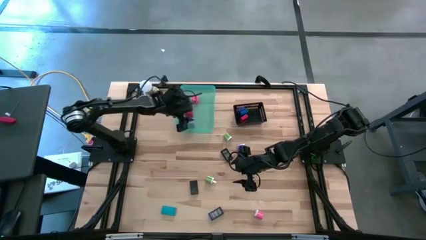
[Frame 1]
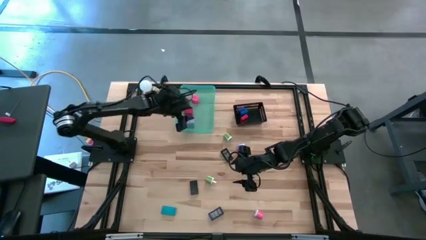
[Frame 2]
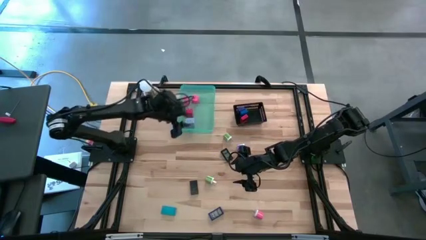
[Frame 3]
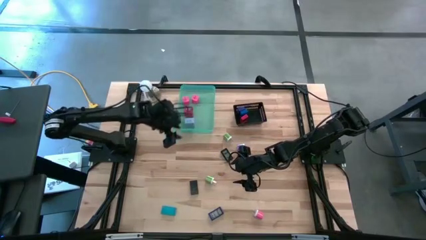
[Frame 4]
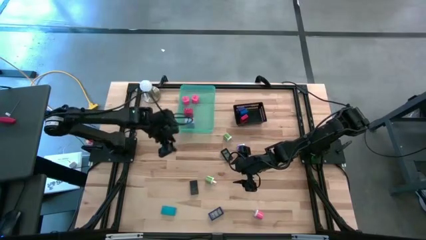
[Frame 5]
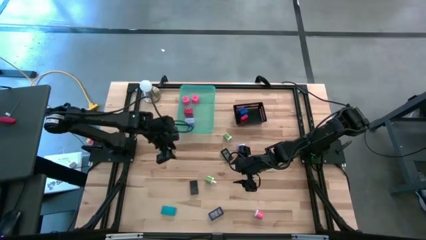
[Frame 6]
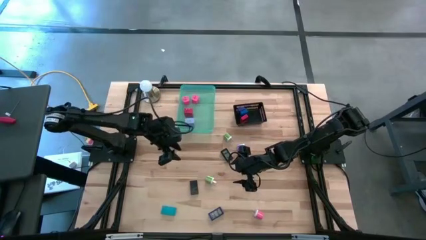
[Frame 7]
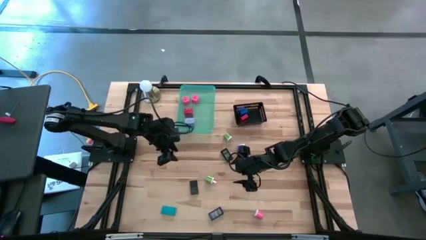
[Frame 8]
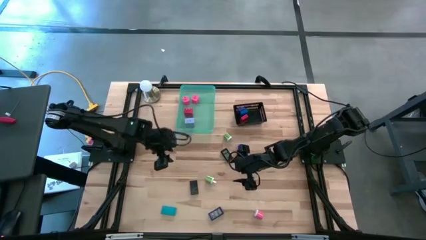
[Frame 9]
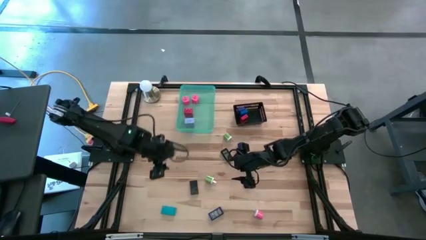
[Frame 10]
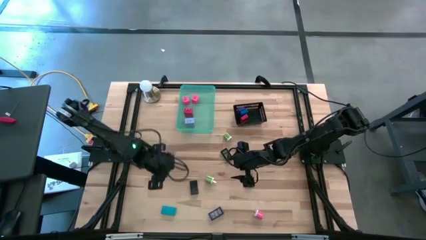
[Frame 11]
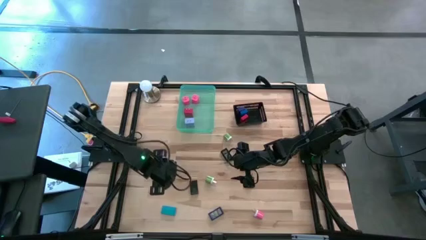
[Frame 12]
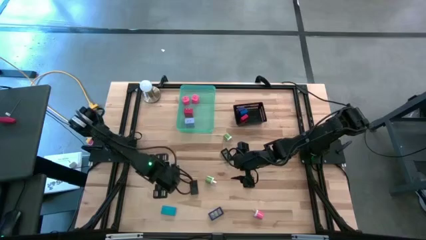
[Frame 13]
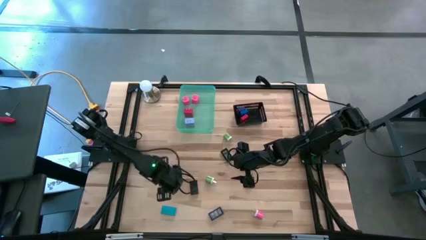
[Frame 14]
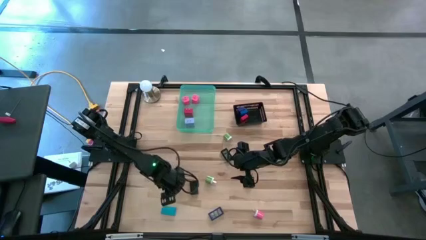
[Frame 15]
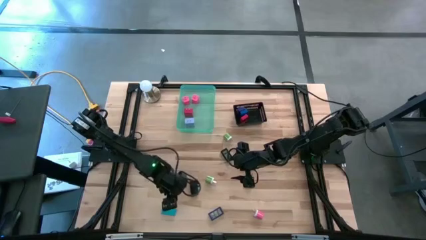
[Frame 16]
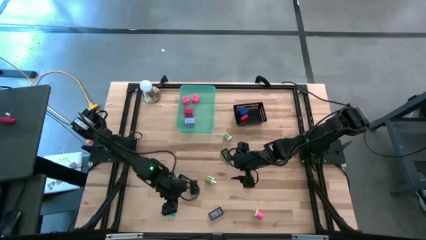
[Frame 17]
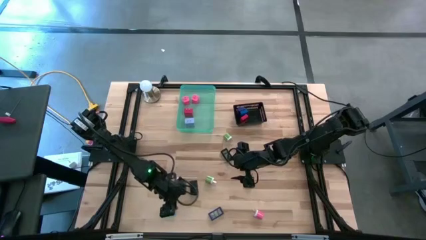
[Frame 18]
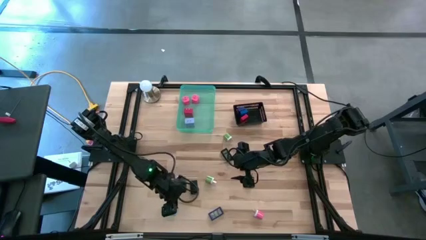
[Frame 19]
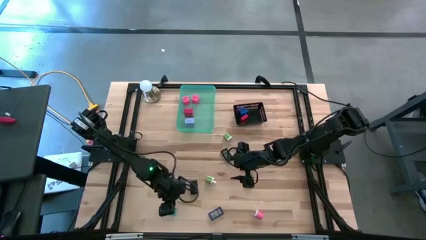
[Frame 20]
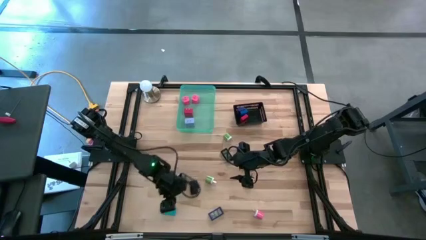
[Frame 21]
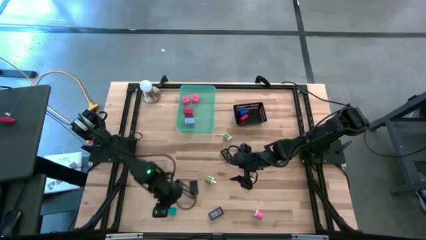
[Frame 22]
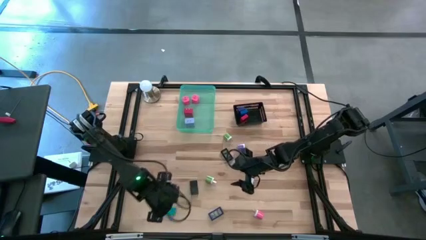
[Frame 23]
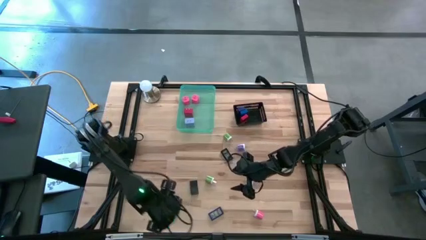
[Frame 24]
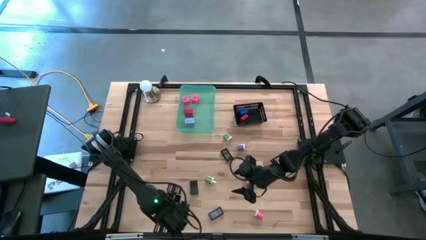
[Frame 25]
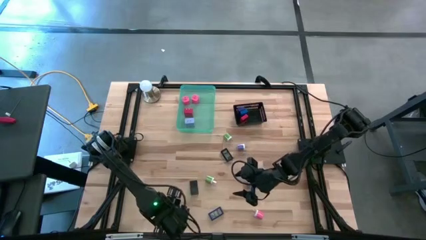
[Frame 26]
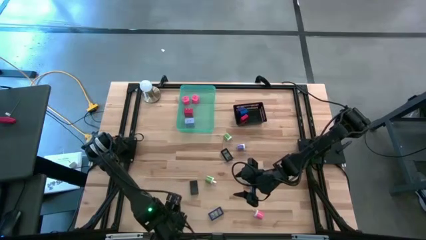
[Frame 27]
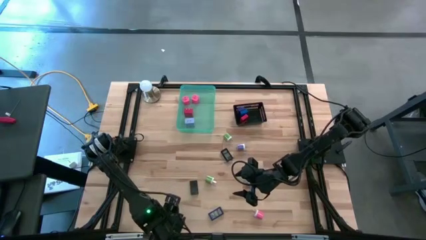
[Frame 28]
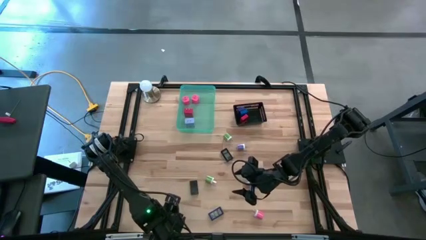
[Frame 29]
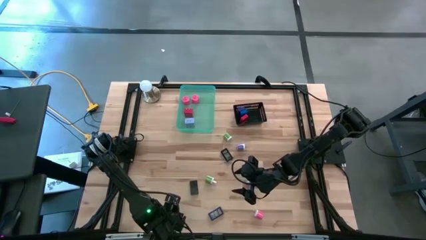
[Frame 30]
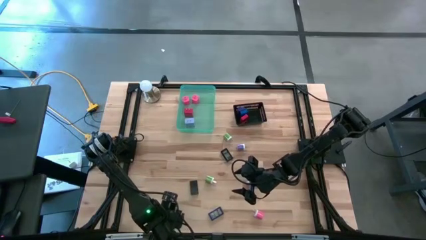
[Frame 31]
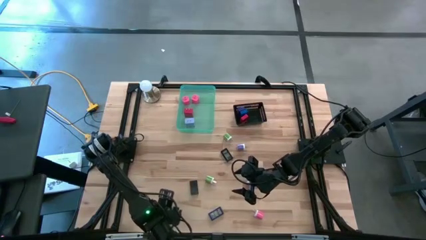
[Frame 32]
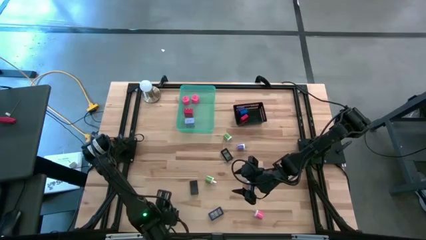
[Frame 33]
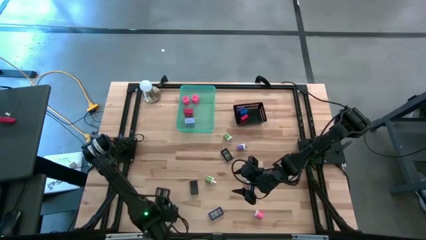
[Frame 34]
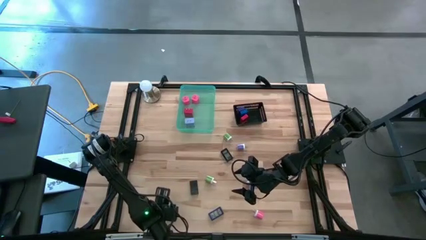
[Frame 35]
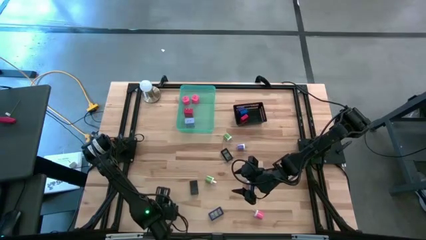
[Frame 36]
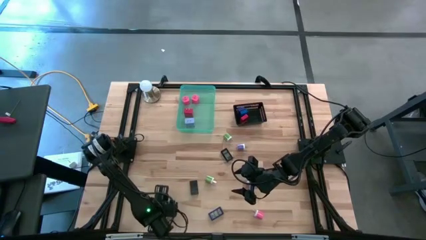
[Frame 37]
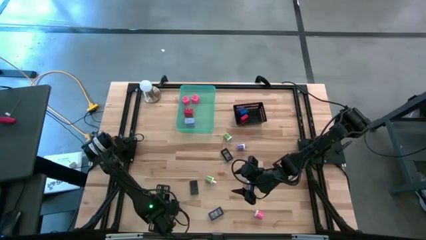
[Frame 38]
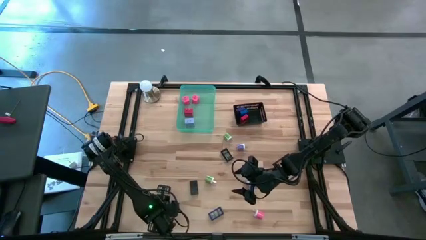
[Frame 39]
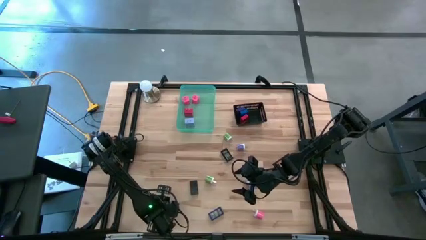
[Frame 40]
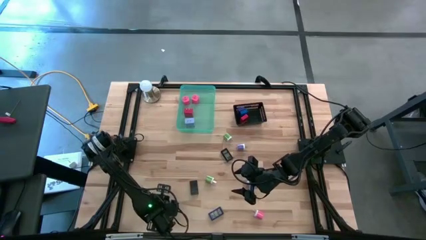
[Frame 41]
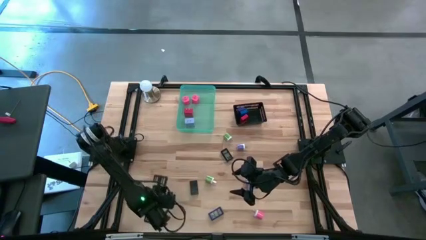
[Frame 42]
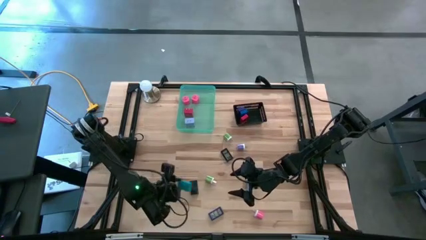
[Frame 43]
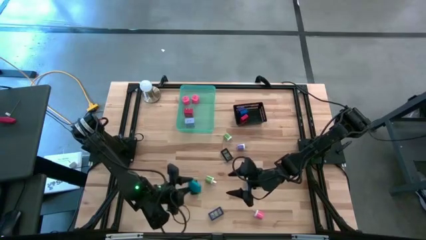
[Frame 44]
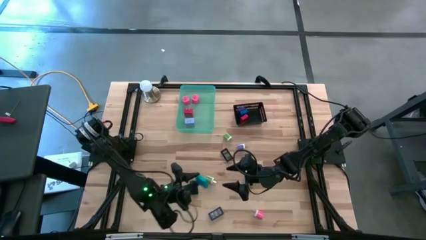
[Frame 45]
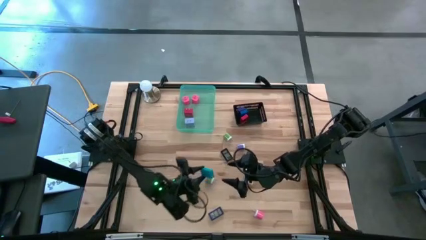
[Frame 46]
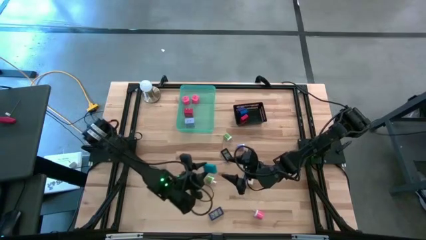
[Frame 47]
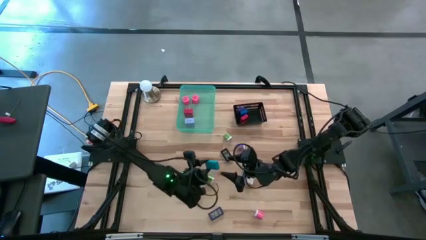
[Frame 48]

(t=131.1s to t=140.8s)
Task: Pick & Place Office items
Put the light blue digital clock into the black bin

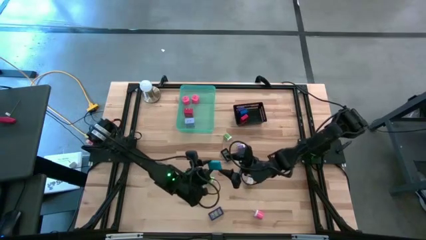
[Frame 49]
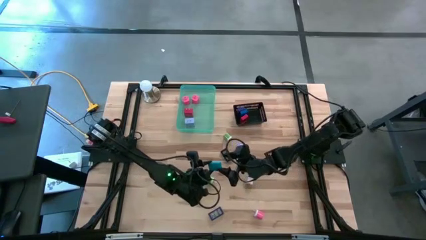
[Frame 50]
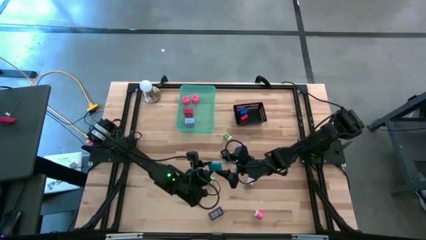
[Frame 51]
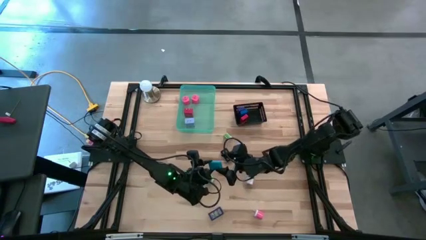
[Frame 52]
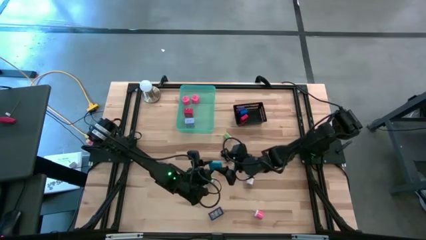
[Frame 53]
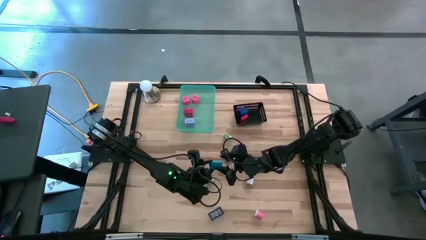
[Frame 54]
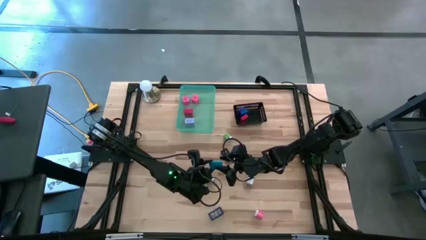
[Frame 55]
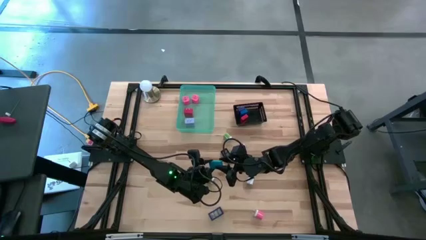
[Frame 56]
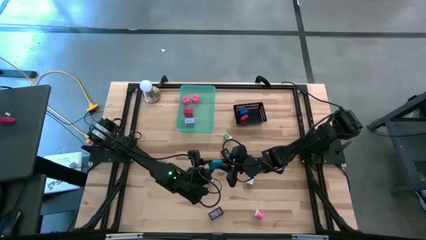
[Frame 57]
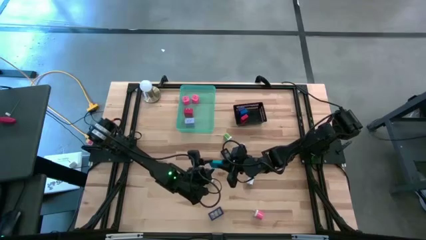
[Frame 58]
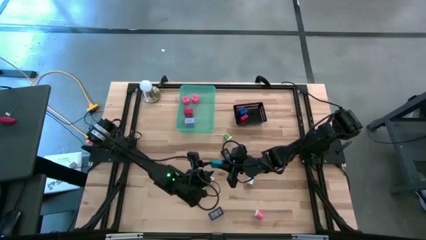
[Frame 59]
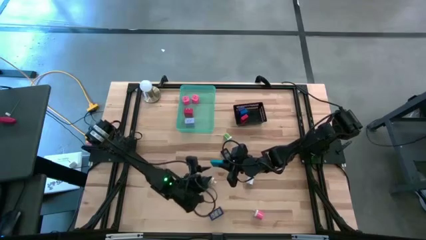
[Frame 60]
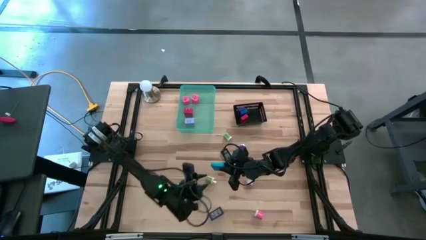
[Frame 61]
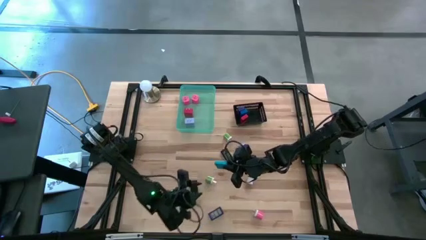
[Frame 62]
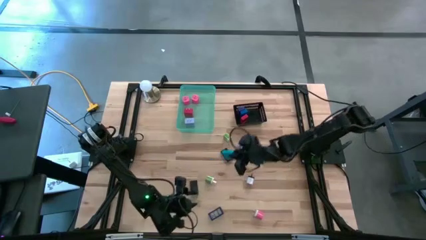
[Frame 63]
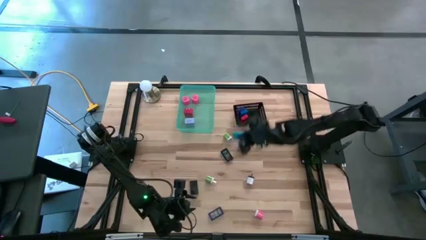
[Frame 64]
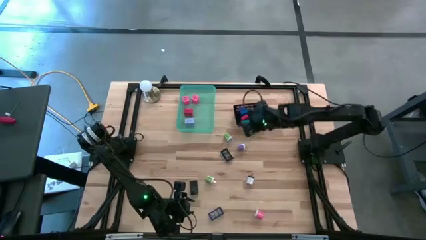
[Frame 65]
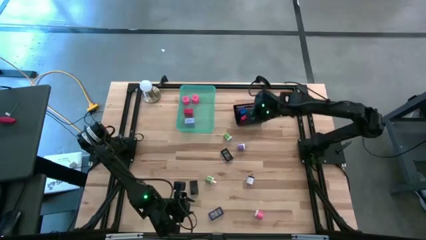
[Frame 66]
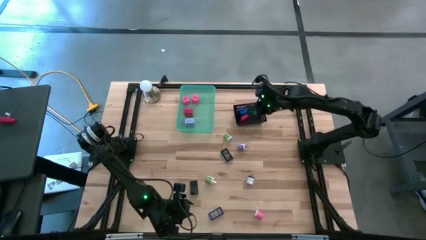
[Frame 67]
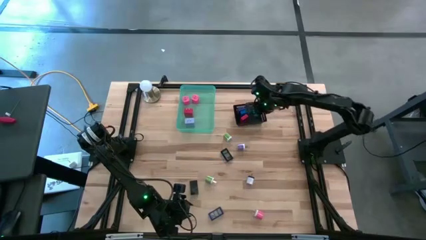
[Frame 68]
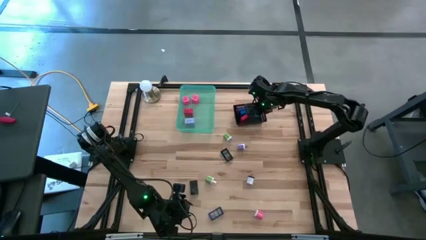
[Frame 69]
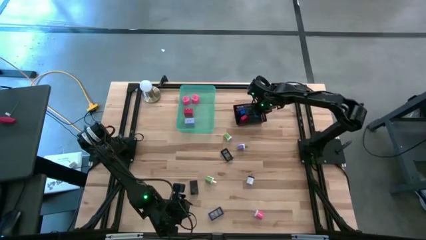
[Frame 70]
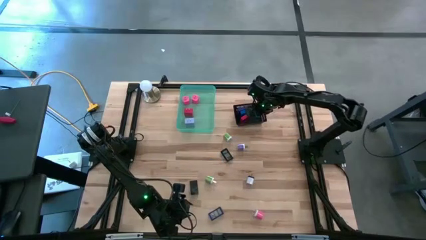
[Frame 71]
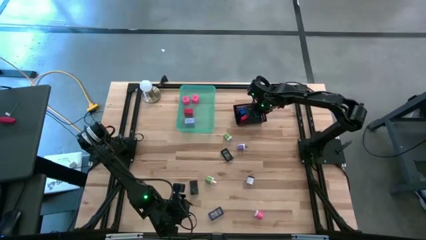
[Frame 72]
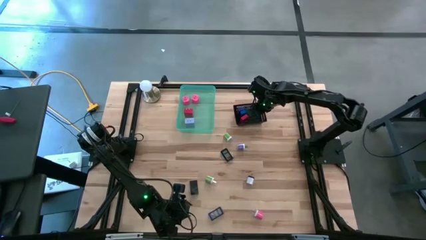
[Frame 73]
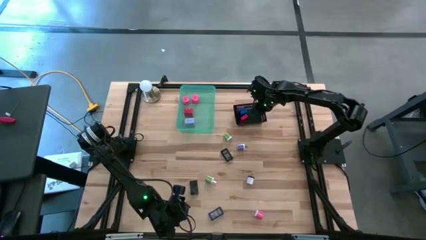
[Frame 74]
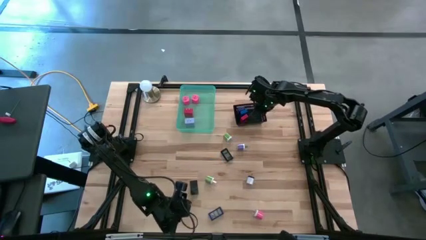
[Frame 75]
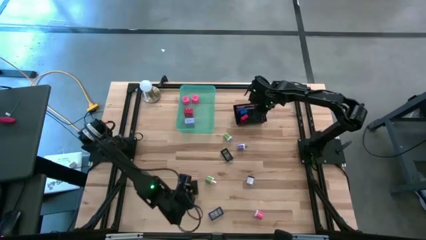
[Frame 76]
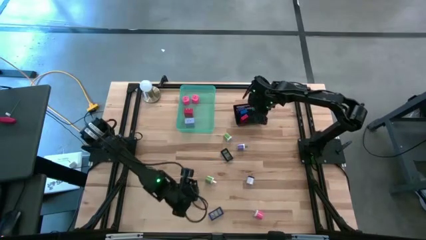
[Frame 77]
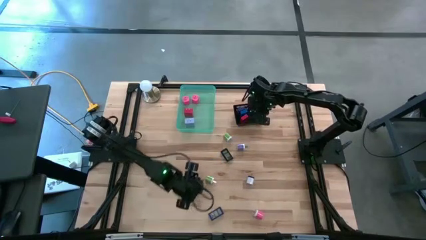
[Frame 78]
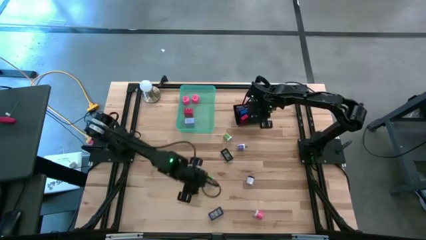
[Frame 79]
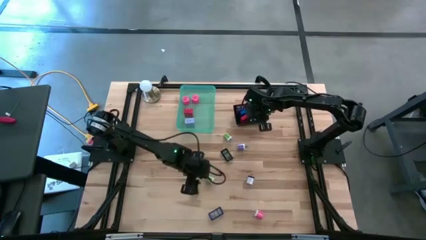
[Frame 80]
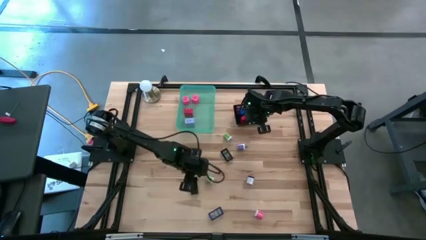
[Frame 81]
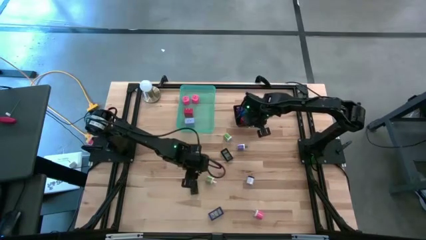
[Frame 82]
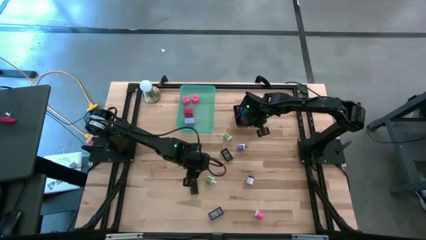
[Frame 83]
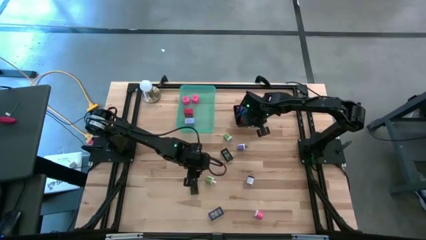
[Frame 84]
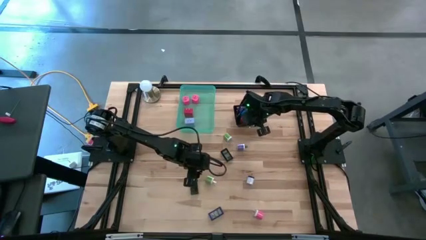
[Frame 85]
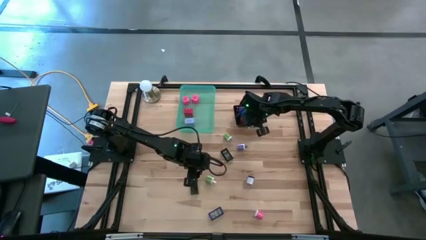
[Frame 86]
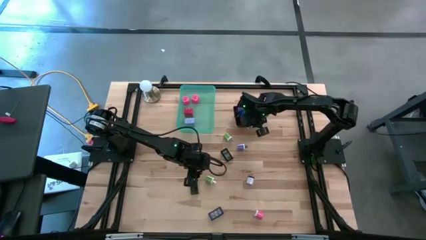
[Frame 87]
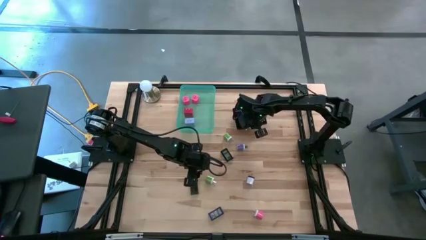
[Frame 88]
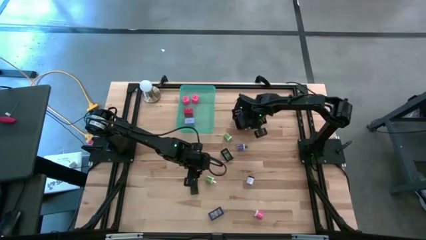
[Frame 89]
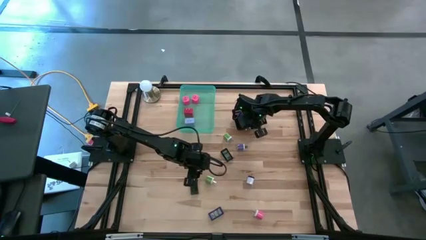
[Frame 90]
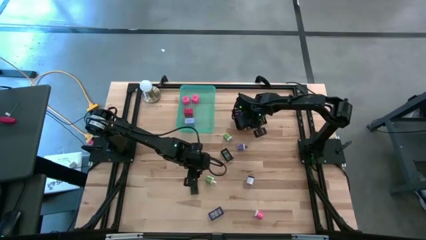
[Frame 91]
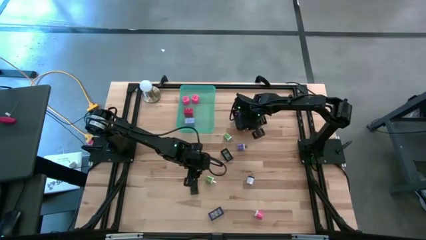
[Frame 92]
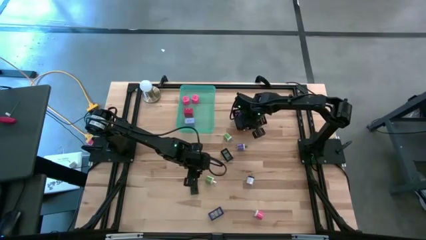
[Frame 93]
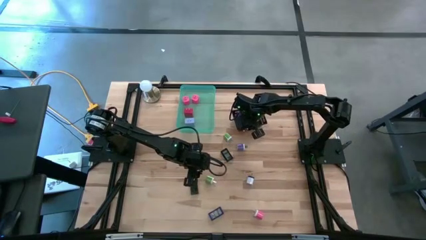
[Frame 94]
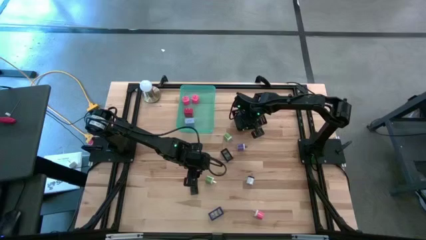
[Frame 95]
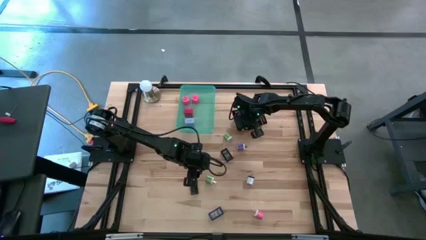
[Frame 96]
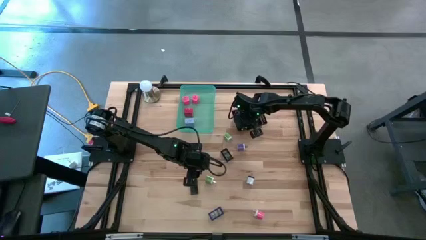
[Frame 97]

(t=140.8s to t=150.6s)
Put the light blue digital clock into the black bin
